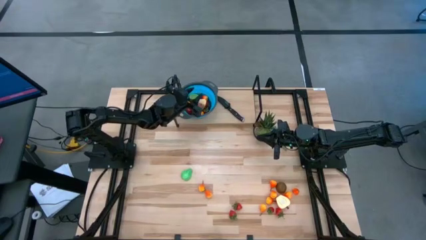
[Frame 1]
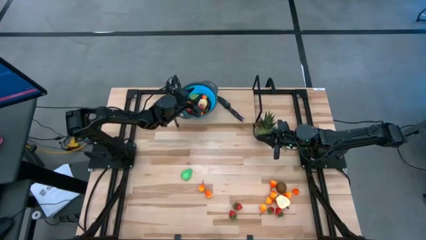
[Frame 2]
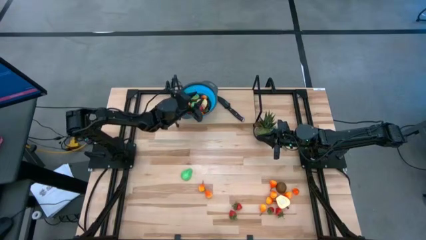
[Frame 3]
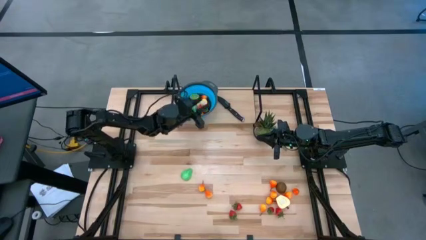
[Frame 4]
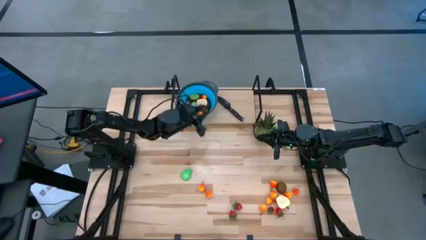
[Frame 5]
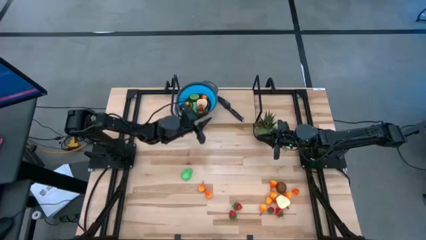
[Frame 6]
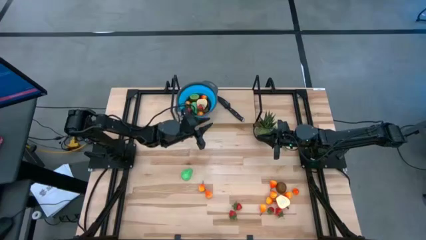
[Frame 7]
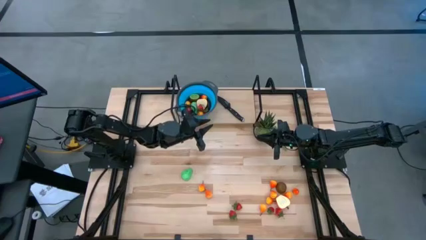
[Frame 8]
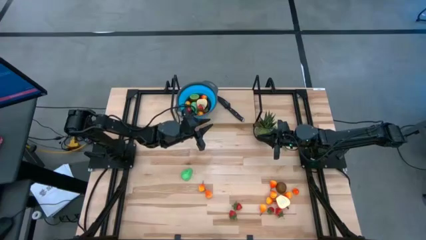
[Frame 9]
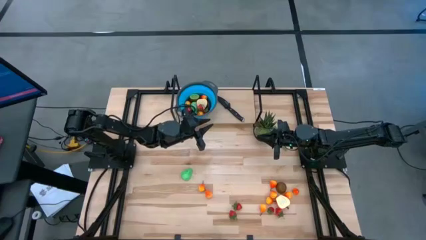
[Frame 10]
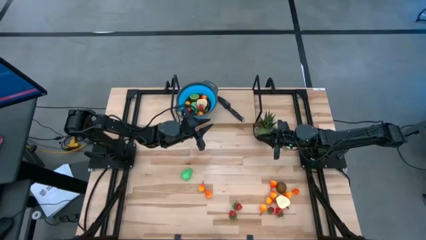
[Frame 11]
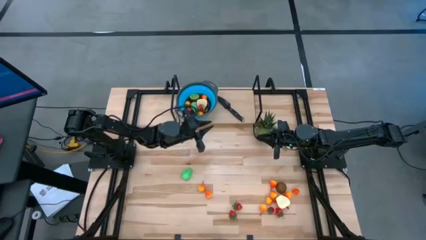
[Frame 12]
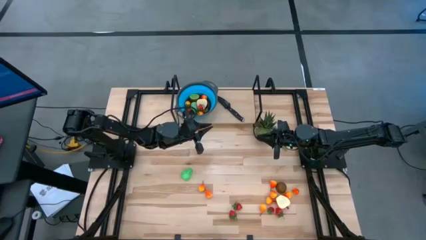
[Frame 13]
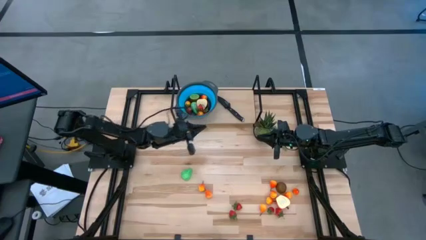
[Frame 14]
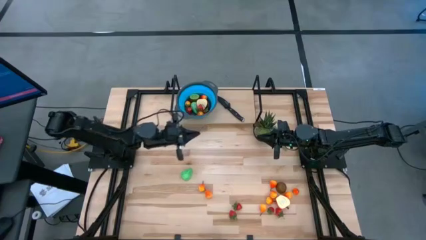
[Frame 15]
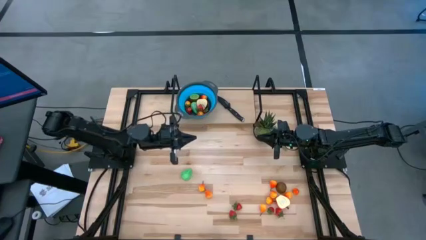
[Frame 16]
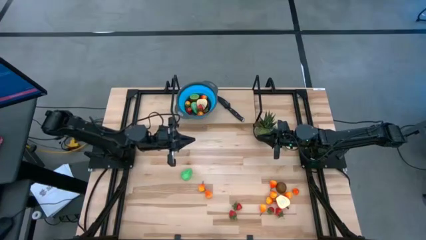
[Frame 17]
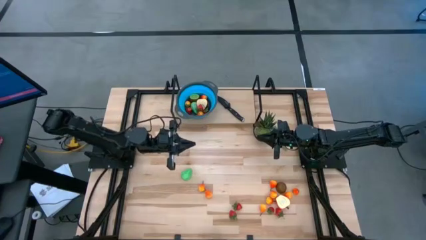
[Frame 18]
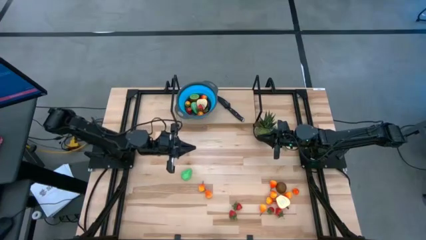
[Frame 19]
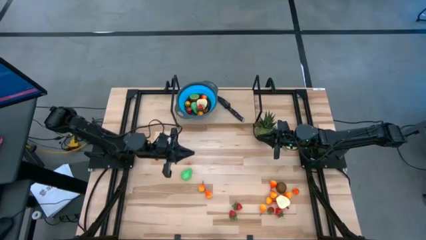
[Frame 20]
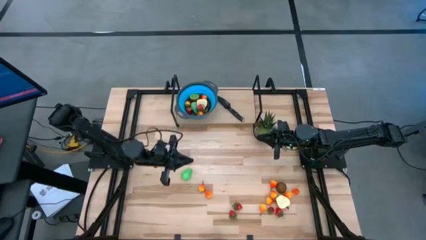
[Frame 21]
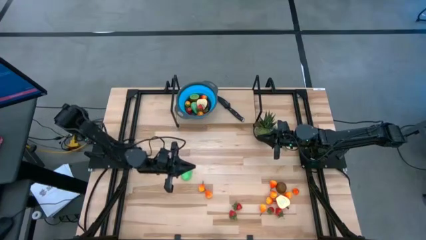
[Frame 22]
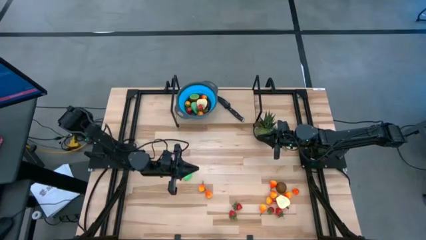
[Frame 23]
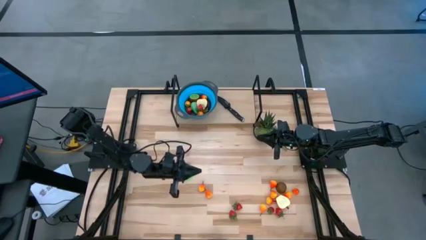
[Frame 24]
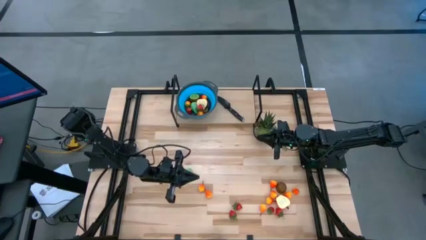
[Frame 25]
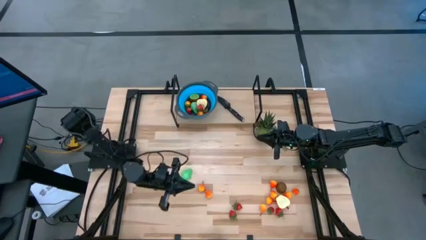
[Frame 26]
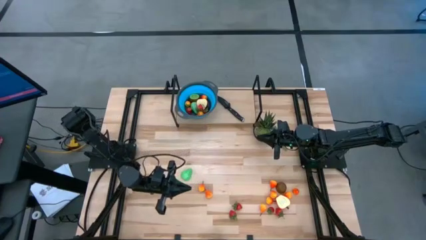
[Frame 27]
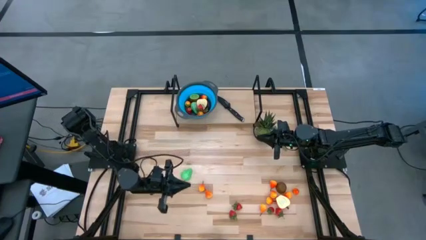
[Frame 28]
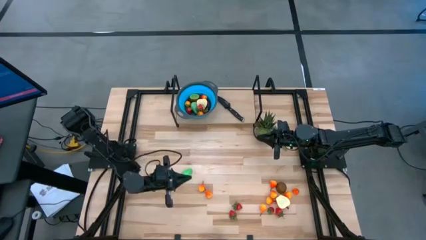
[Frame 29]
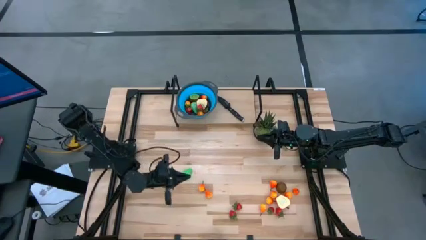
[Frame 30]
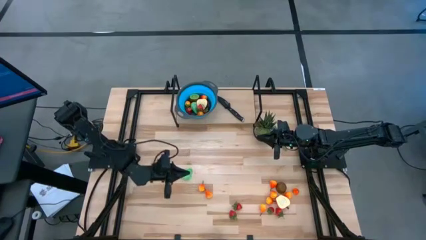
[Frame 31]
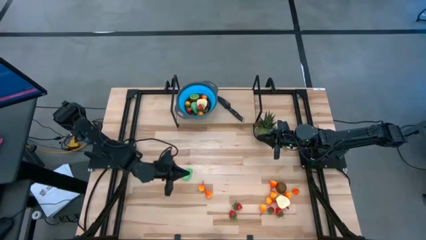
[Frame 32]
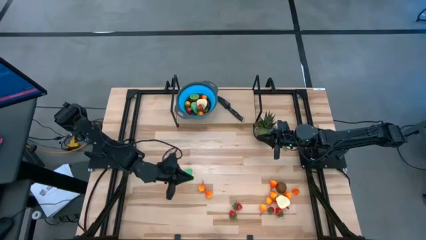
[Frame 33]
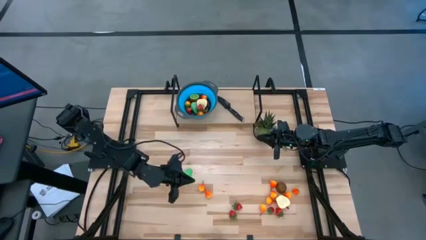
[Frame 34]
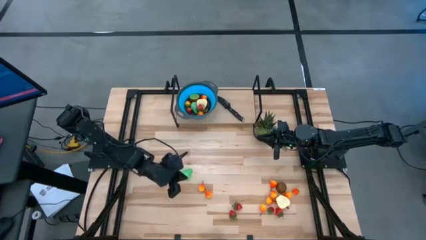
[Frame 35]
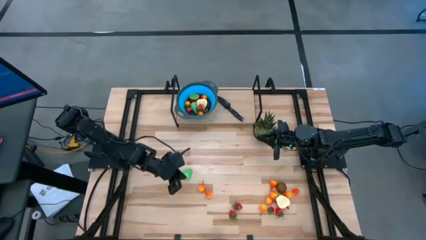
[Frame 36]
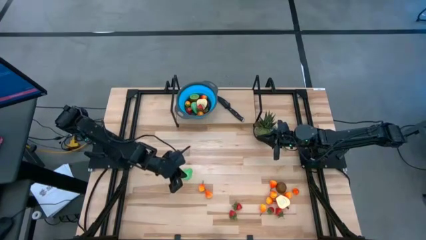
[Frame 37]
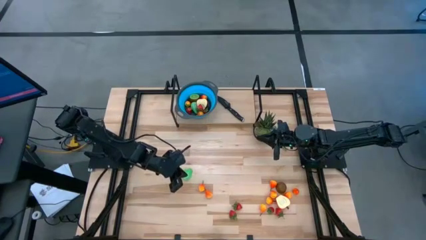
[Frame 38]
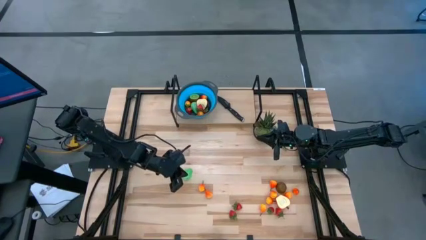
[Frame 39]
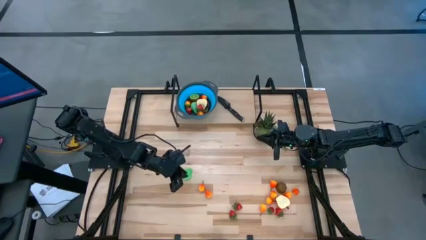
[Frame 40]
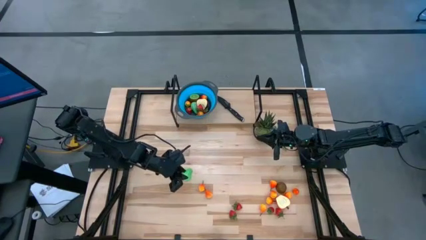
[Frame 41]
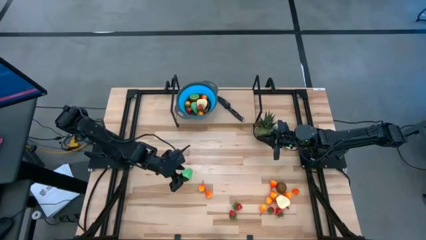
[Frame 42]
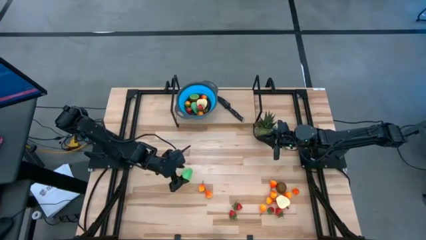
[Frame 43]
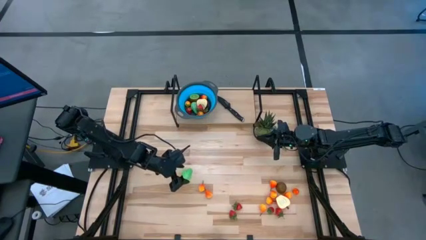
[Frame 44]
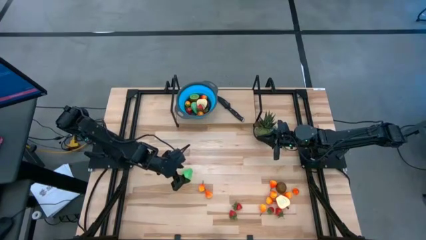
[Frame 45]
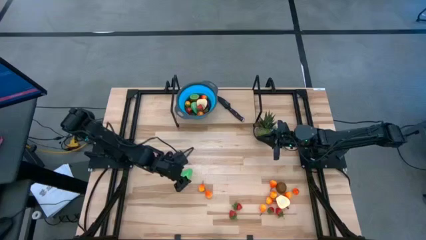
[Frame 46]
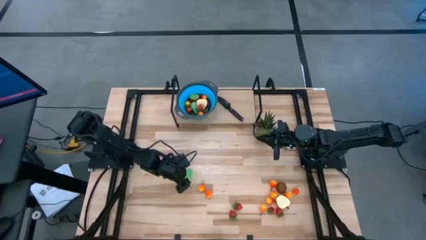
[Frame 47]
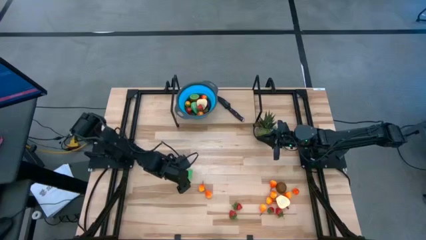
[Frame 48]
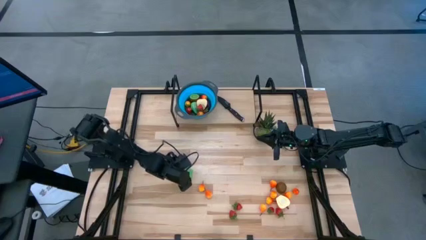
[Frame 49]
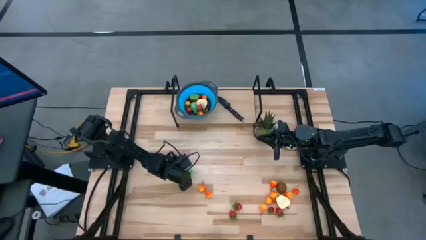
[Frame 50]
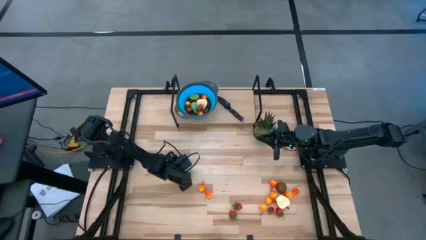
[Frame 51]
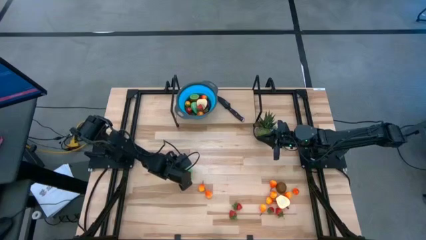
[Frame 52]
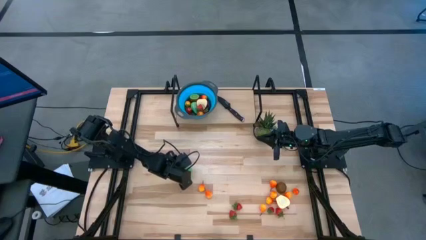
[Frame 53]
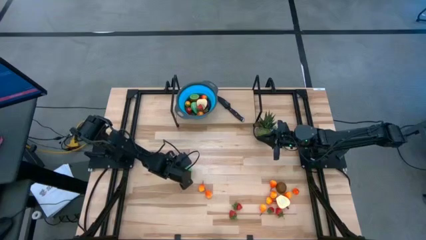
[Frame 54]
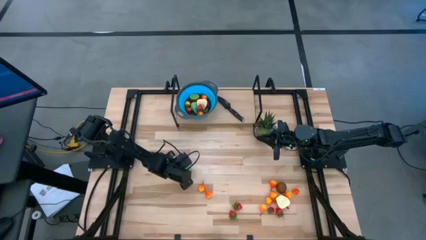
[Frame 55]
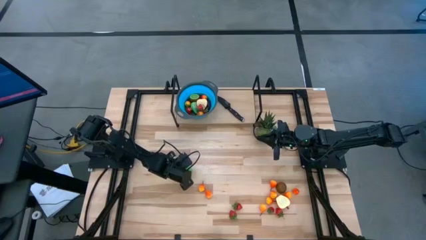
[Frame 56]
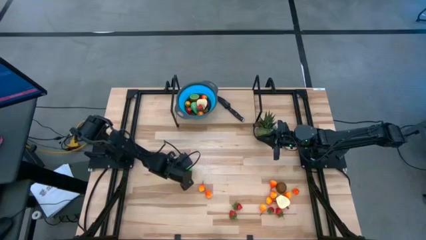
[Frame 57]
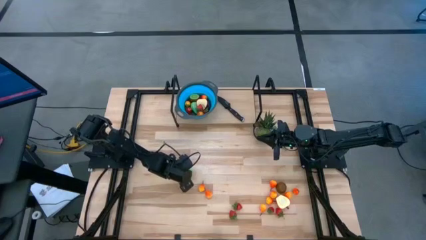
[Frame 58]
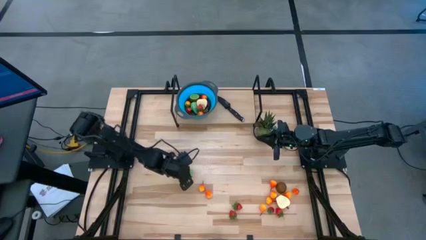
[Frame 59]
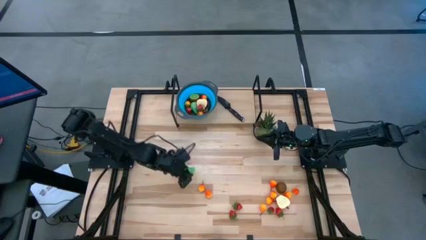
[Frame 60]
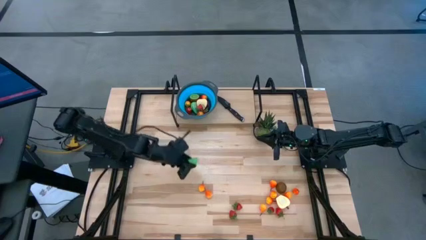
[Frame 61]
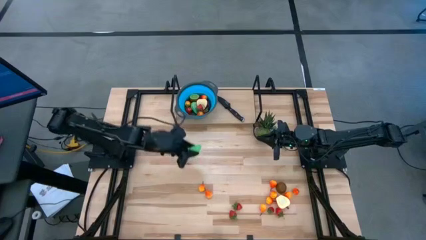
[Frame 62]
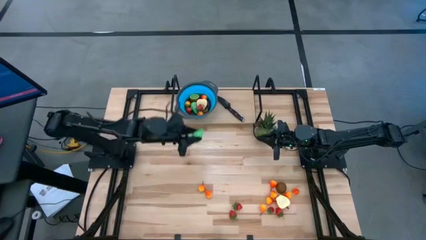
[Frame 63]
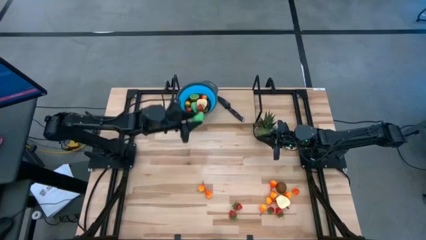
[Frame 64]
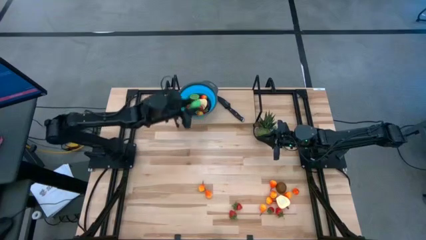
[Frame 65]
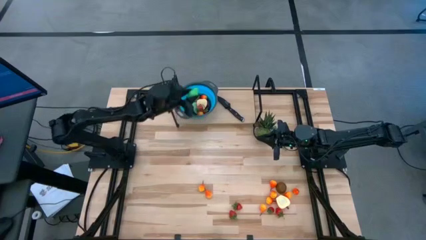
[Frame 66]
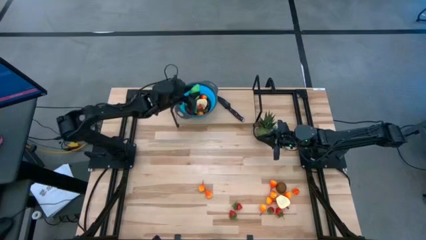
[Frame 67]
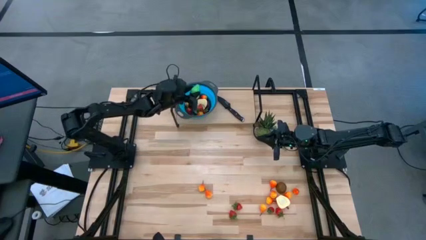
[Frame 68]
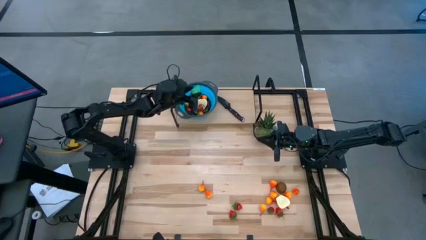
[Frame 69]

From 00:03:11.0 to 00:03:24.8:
Task: Pick & Place Fruit
Put the avocado into the basket

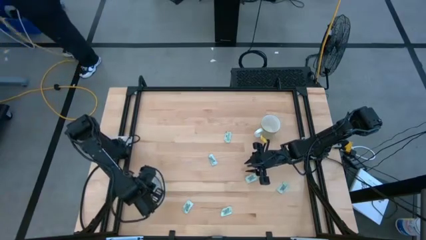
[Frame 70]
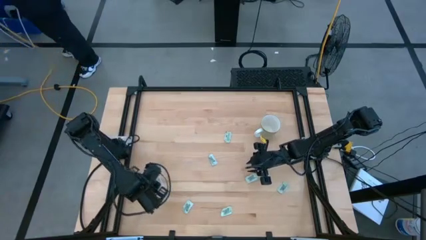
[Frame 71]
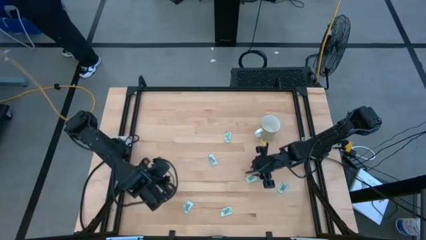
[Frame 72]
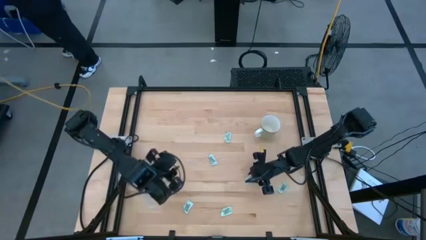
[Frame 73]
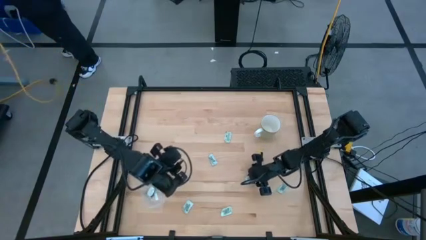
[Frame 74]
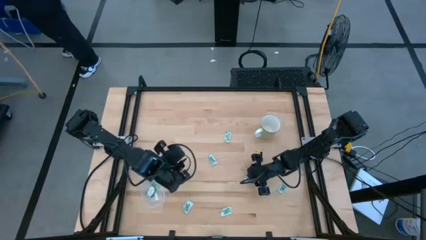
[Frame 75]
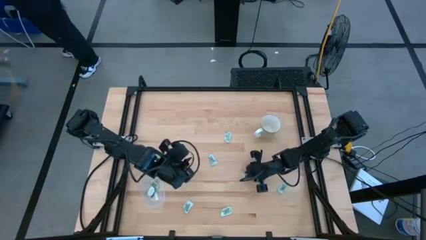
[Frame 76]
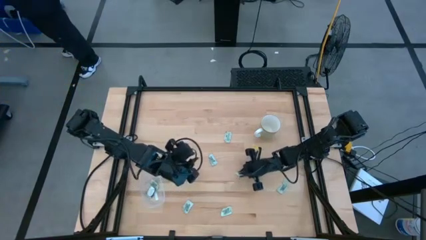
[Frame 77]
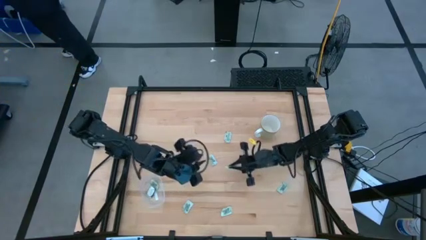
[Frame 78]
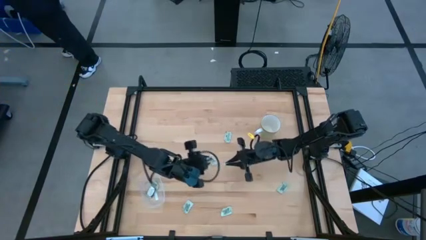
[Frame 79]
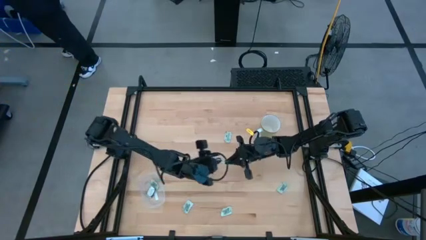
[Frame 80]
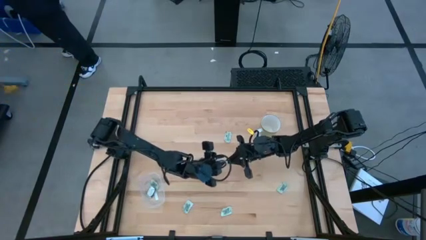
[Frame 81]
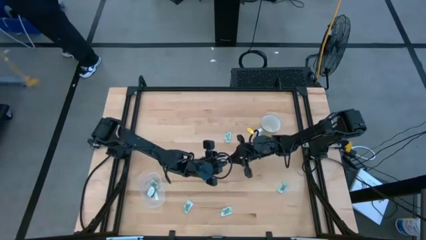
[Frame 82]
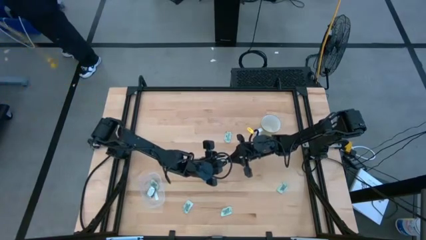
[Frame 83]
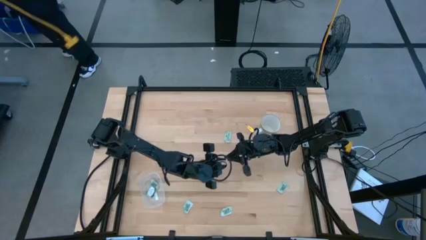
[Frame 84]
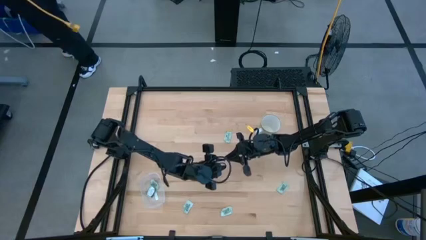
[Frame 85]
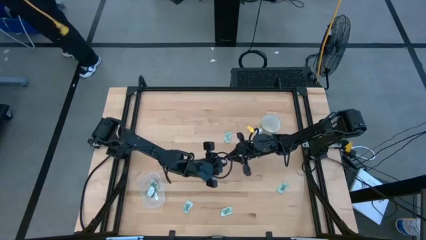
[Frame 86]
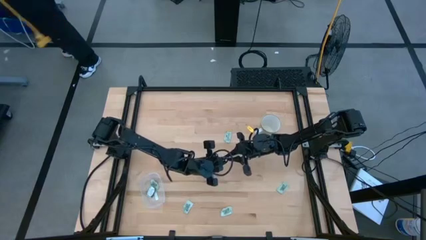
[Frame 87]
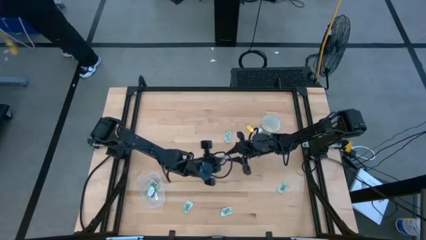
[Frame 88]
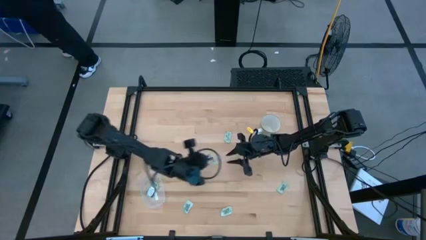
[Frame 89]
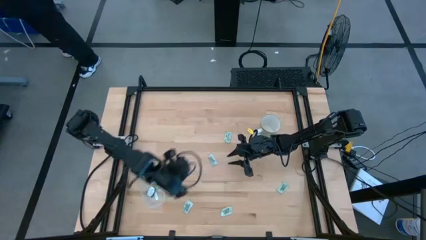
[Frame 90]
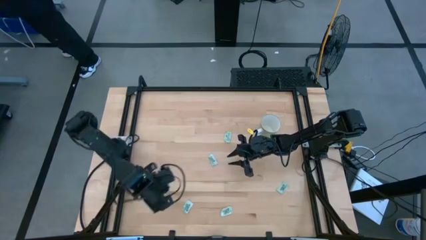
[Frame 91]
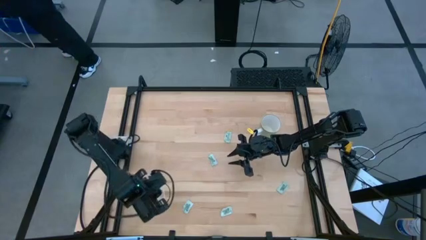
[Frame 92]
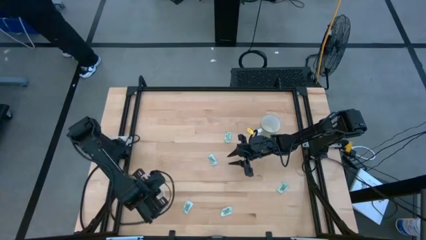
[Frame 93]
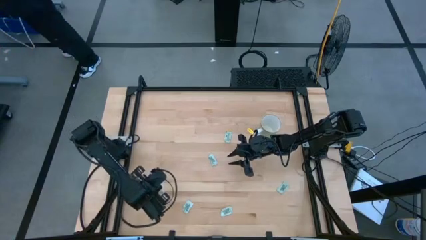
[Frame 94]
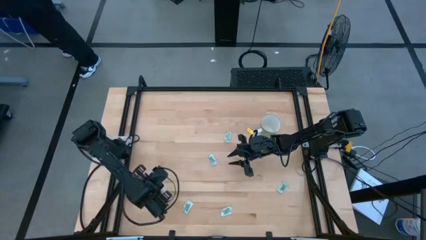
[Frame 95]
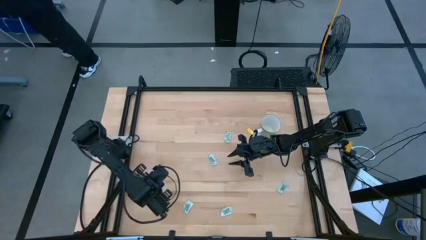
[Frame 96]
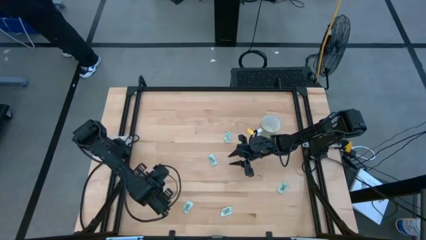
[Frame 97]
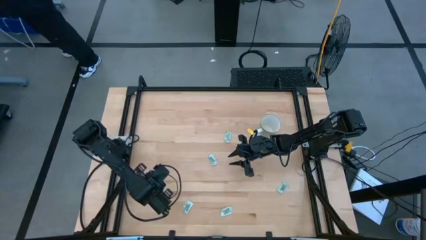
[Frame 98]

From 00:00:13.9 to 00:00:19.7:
Task: Pick and place Stevia / Truvia into bins
Put the stevia packet into the transparent bin
